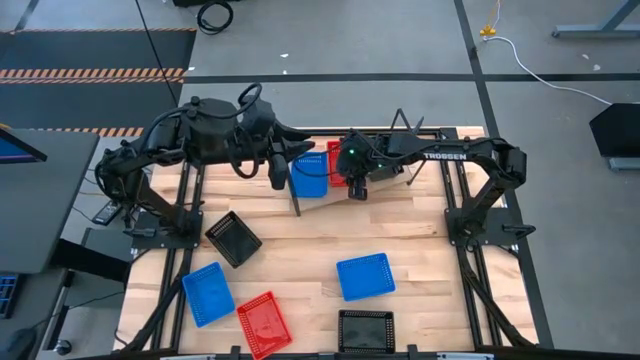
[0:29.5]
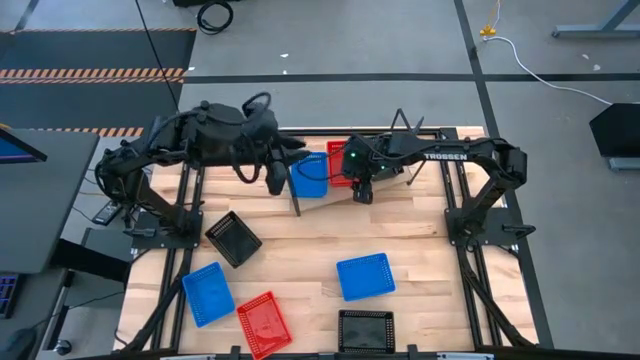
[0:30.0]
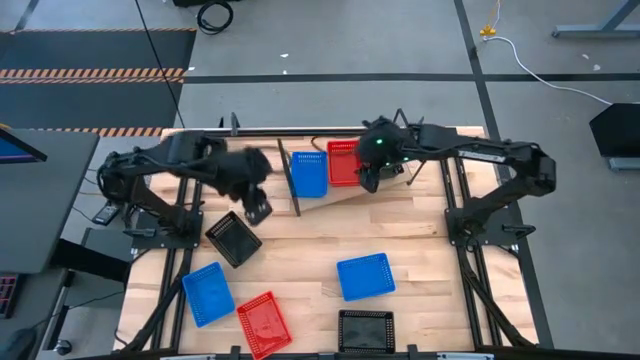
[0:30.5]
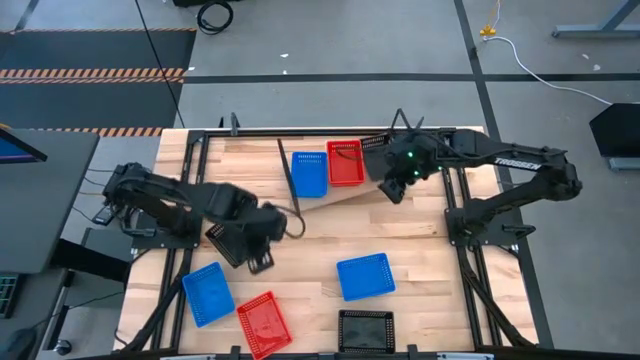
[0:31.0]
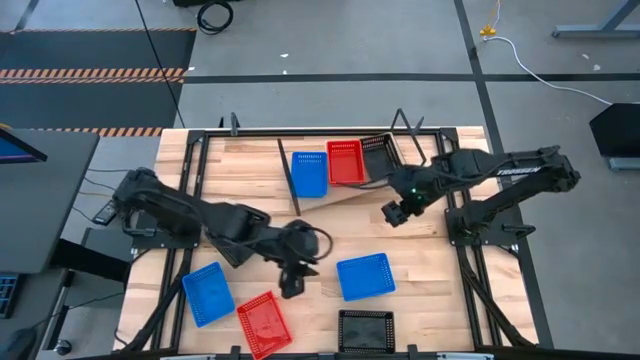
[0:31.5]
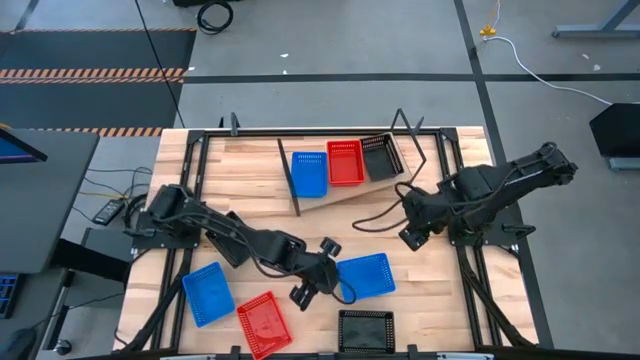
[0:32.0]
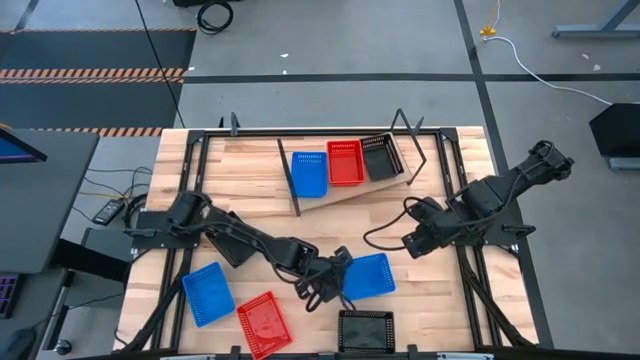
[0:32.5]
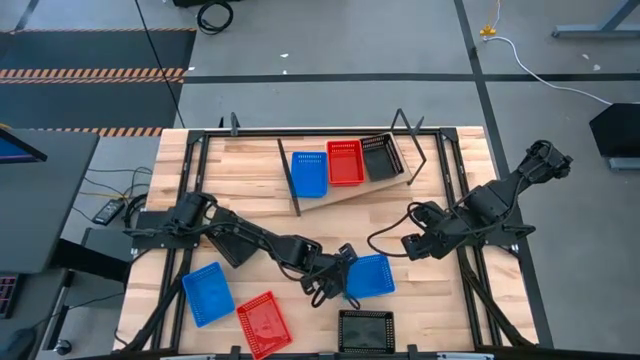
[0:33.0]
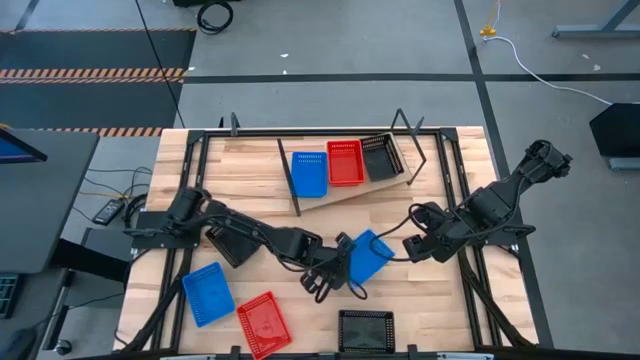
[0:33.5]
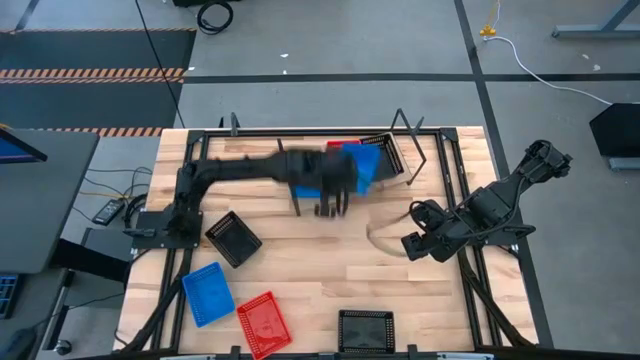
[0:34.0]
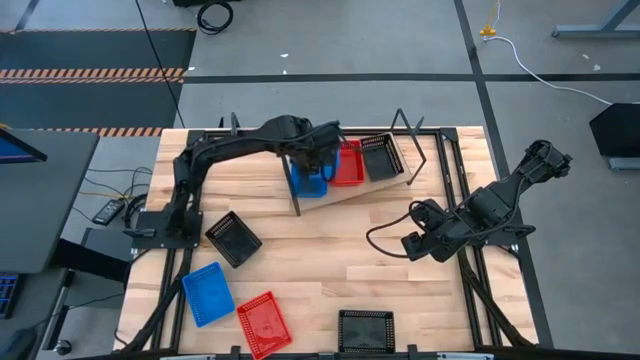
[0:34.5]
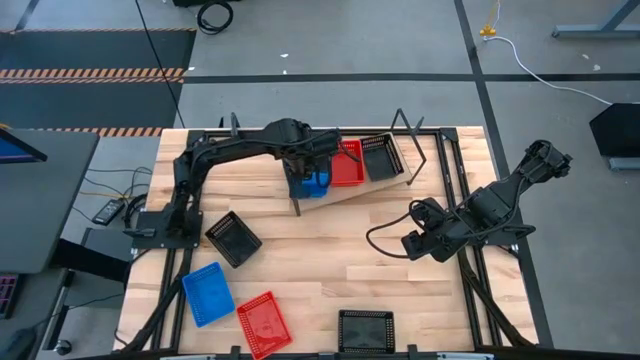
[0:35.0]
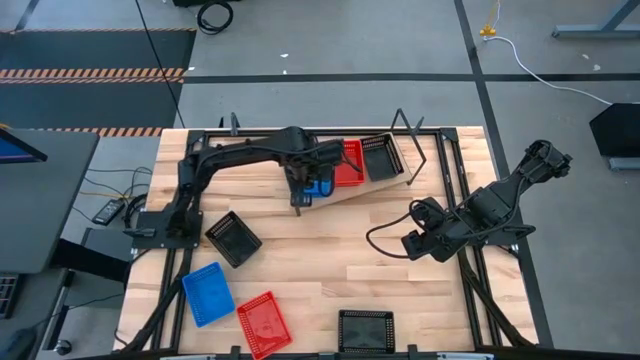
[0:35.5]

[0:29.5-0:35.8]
Task: Stack baskets on shelf by color
Stack the right blue bin on the blue bin on the shelf

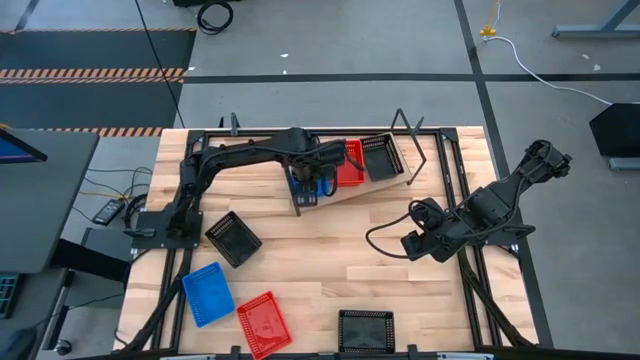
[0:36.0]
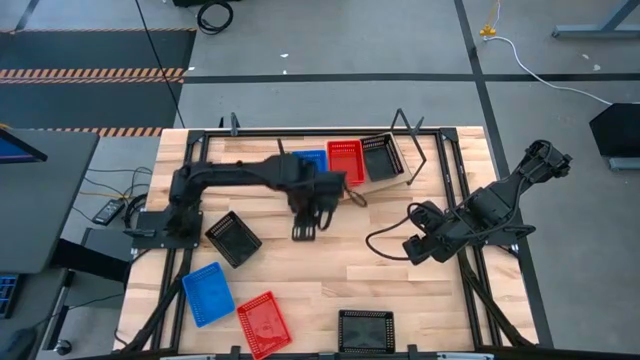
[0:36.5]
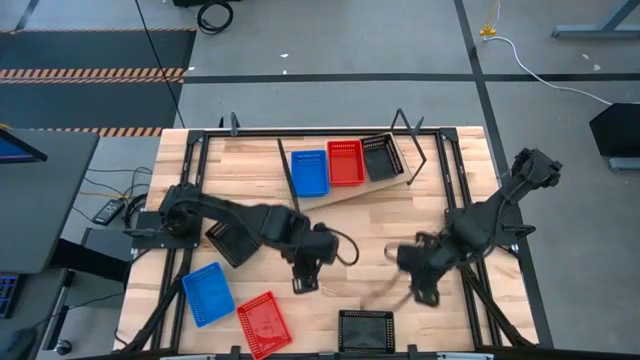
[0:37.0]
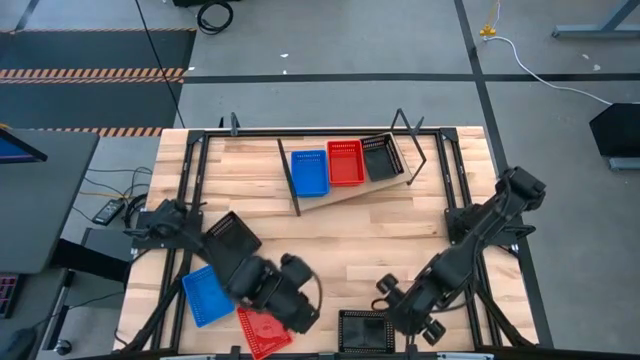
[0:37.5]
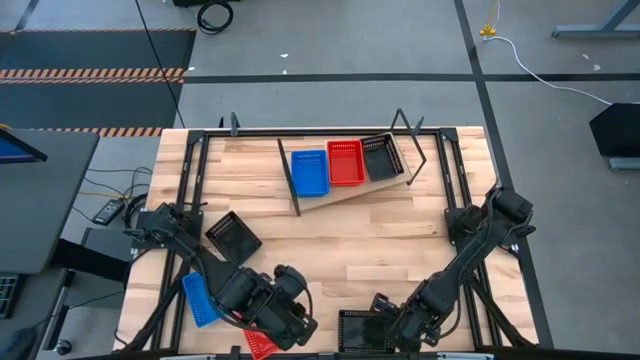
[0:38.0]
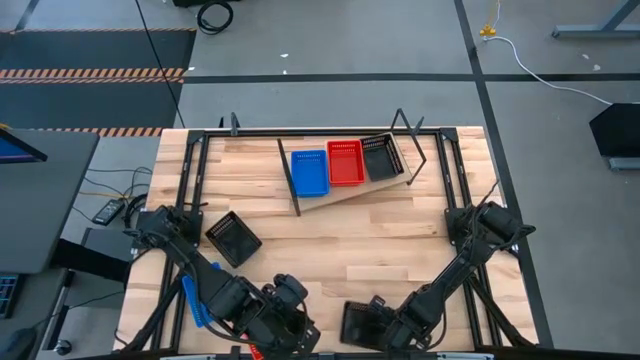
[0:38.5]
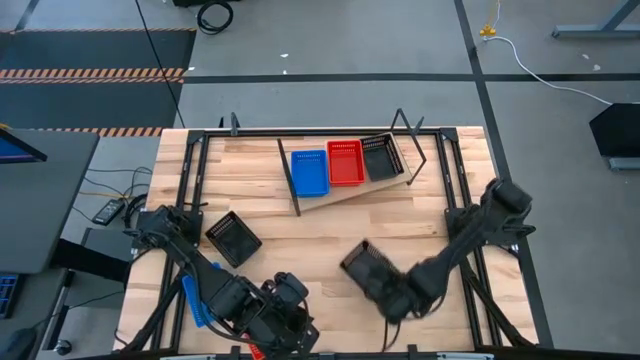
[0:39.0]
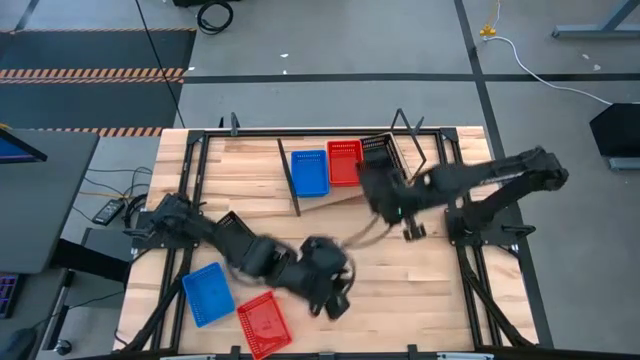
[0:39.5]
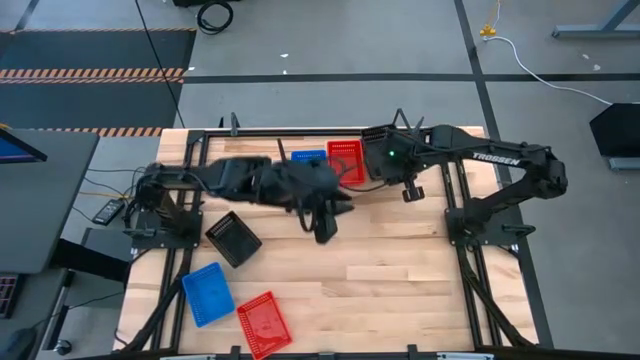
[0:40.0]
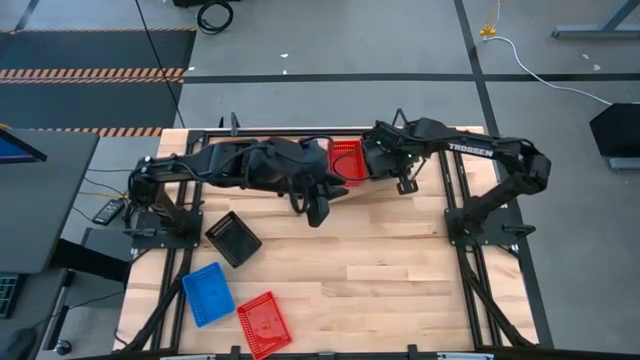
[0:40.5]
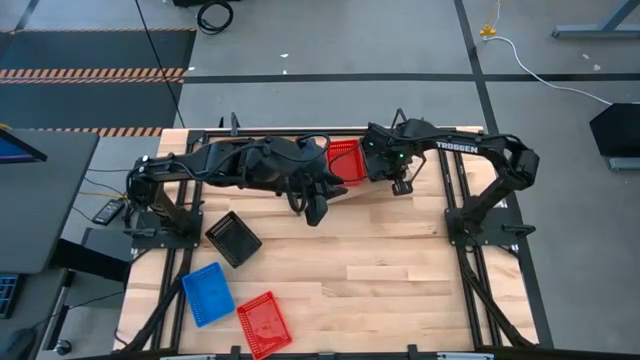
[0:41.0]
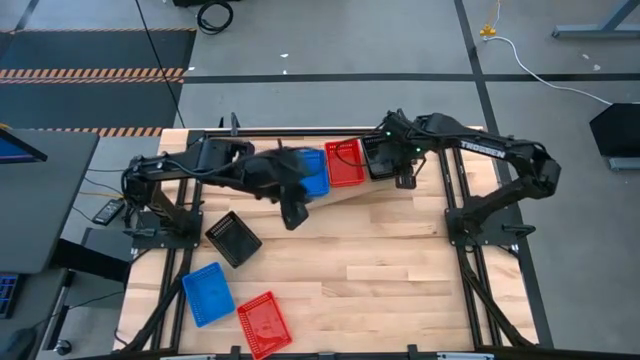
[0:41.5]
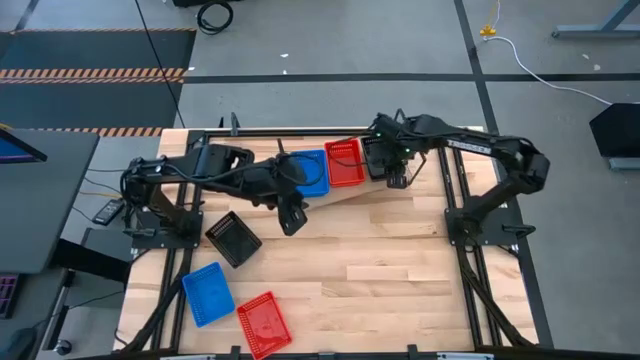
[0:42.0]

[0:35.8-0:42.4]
Stack the bottom black bin on the black bin on the shelf

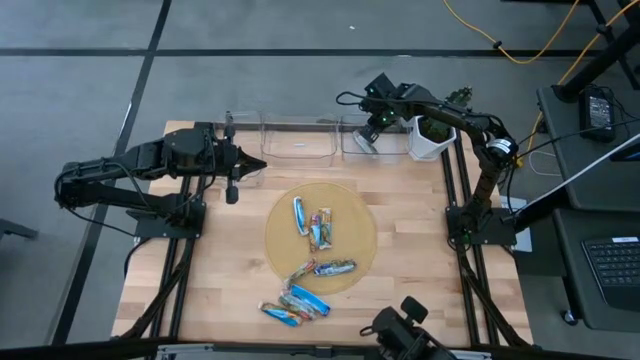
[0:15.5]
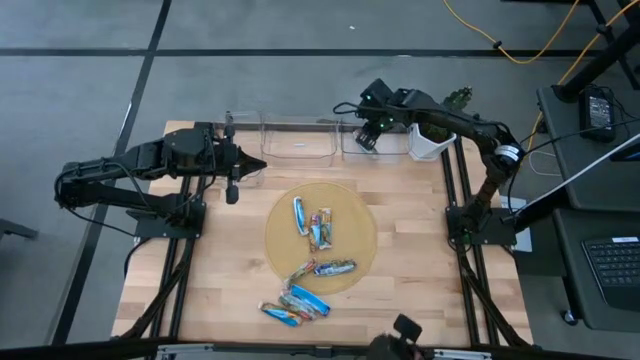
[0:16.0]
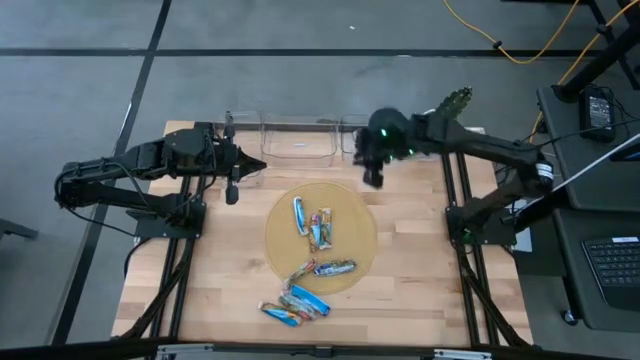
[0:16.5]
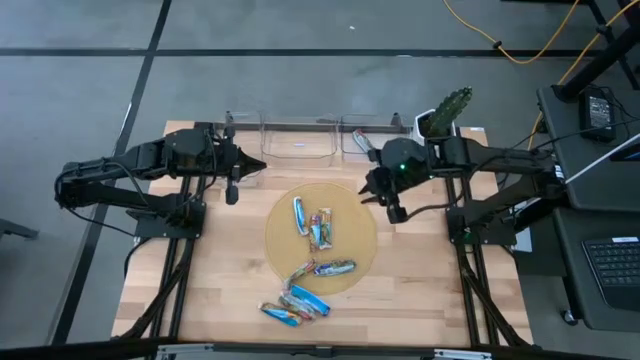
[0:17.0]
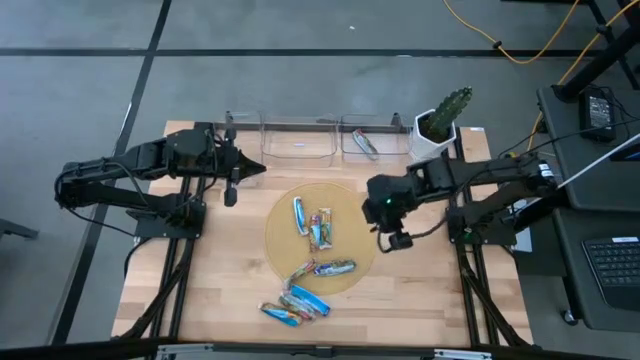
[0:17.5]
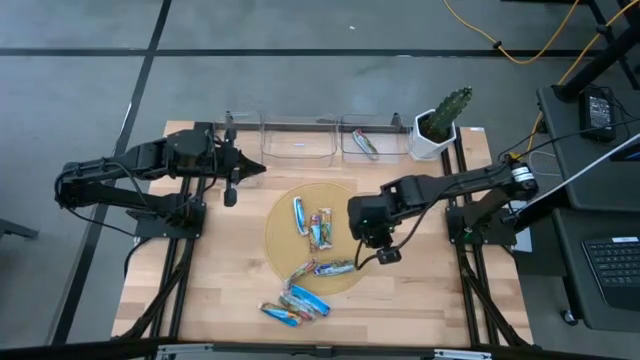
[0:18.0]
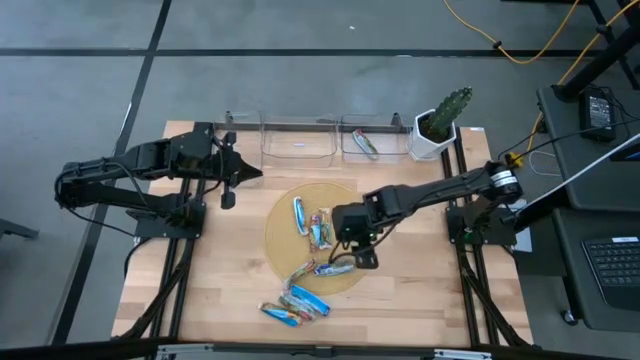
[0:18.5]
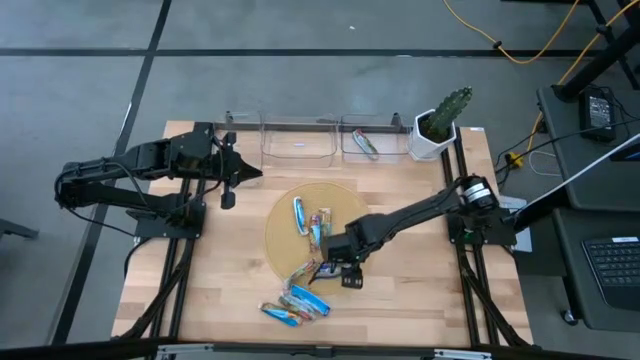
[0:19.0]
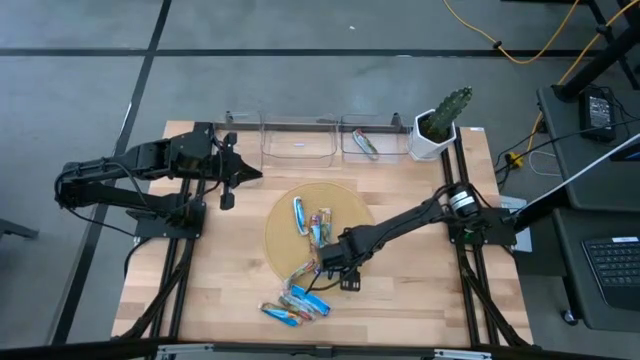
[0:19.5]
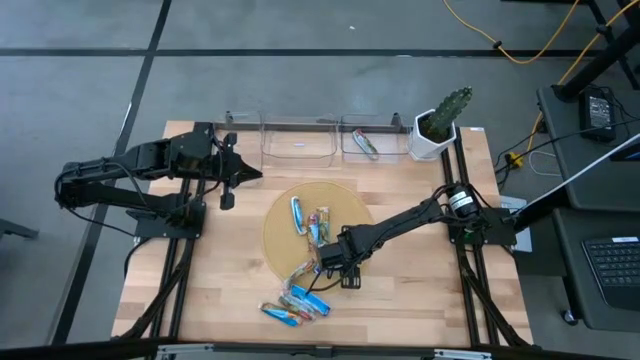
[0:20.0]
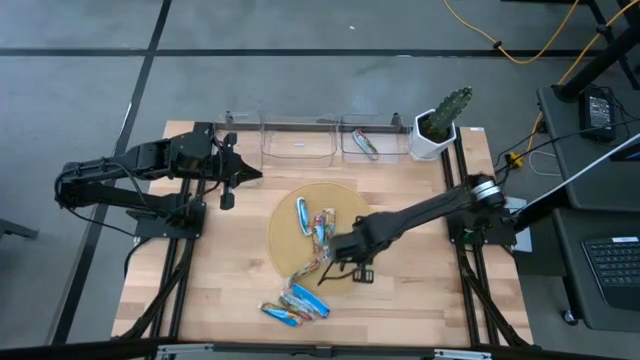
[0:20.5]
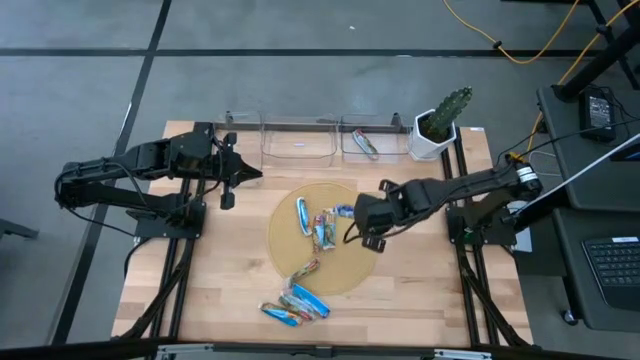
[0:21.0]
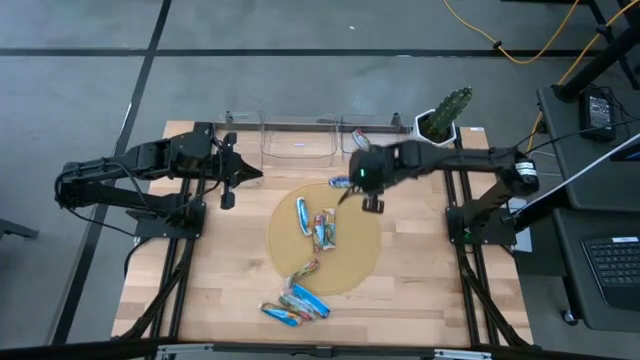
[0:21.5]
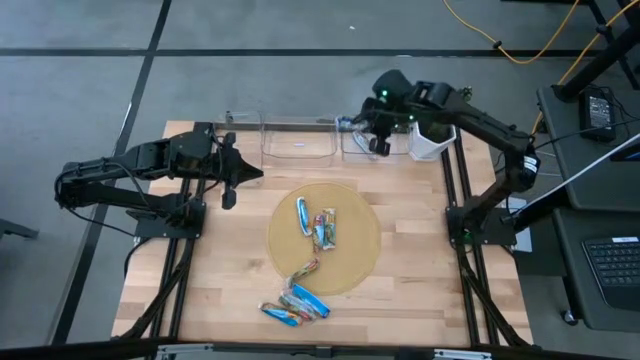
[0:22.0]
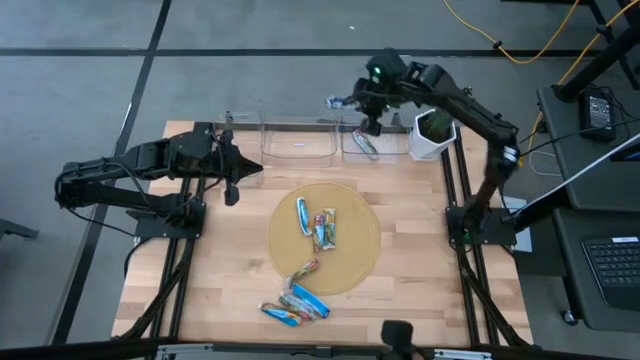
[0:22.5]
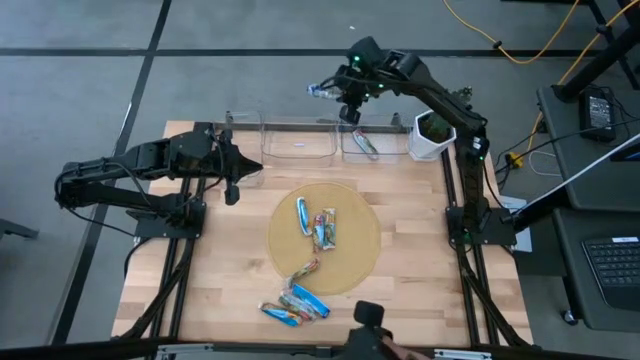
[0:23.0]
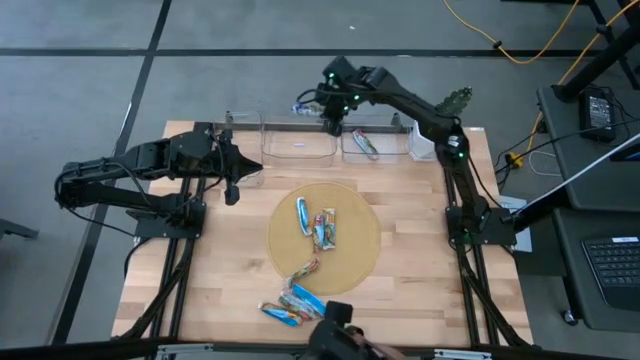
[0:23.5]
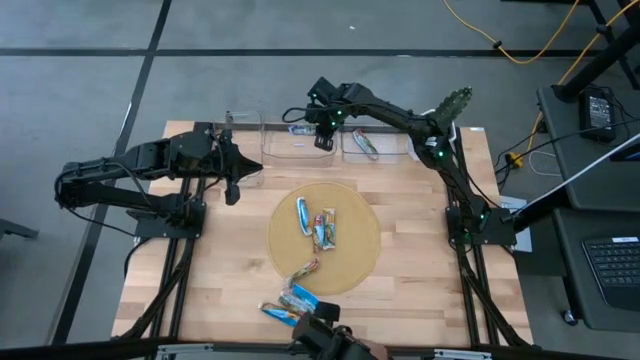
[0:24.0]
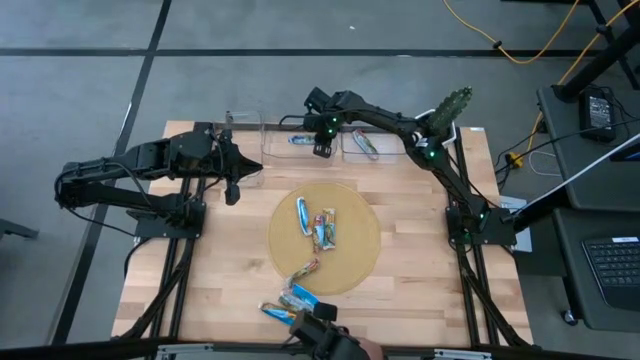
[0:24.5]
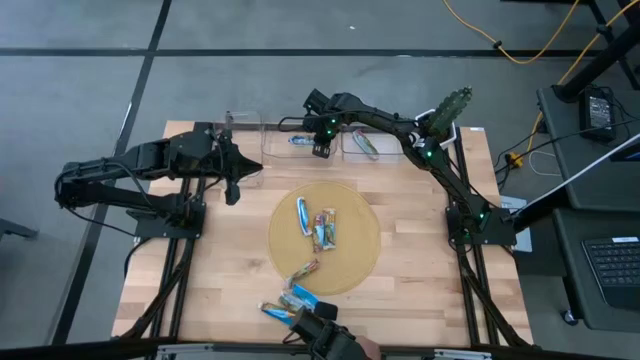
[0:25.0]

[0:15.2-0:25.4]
Task: Pick and place Granola Bars by type
Put the green granola bar into the middle transparent bin
